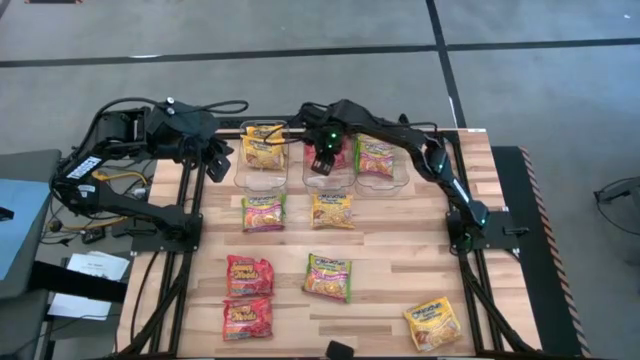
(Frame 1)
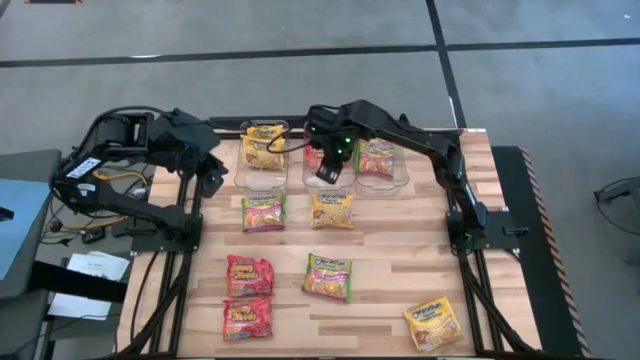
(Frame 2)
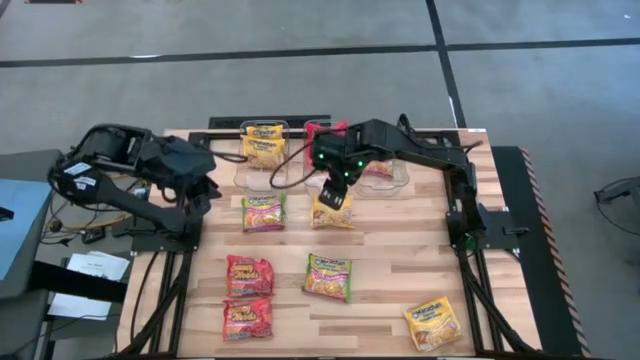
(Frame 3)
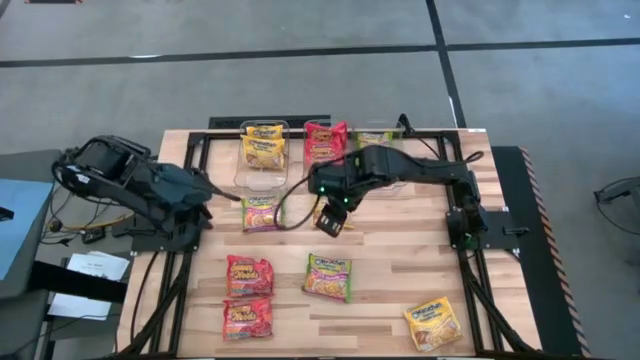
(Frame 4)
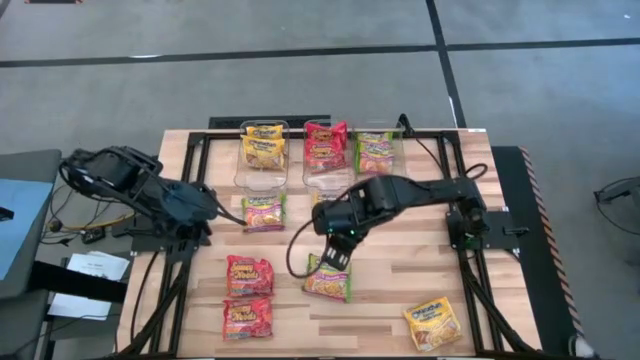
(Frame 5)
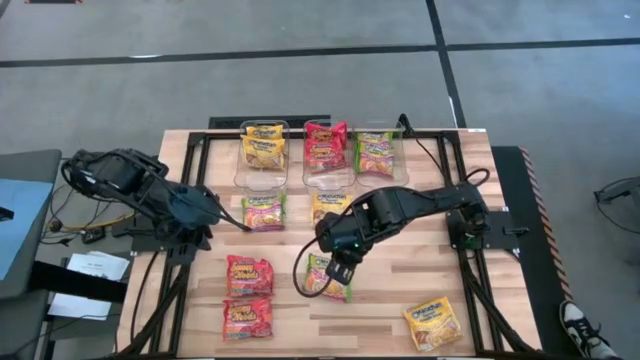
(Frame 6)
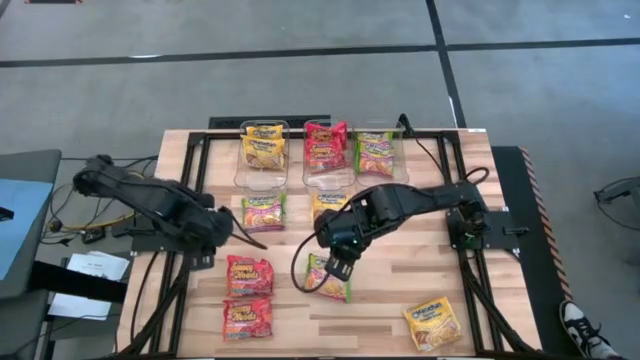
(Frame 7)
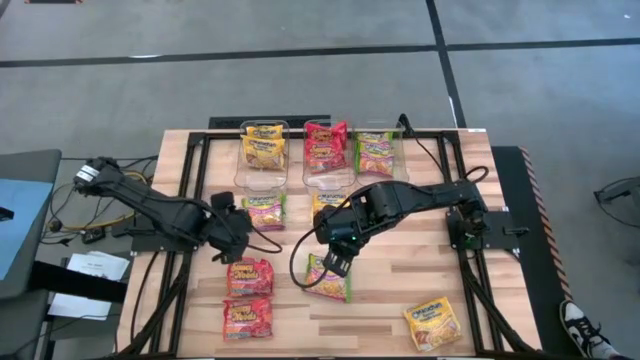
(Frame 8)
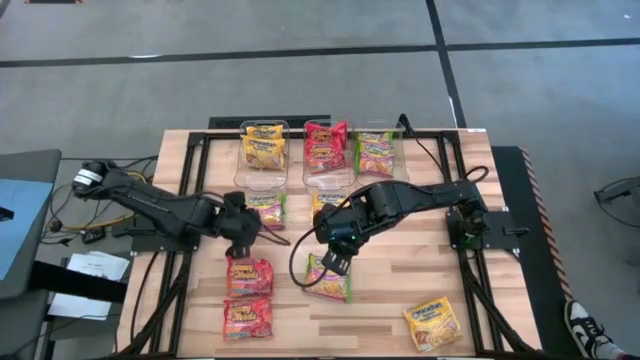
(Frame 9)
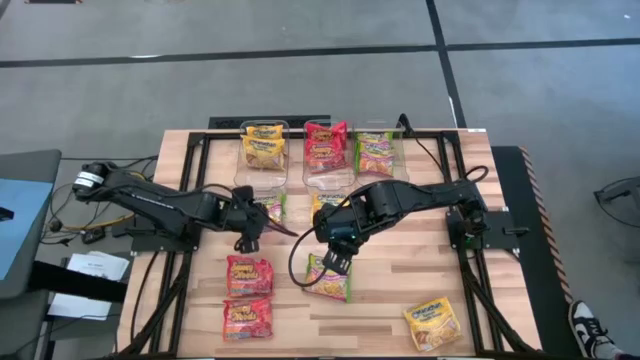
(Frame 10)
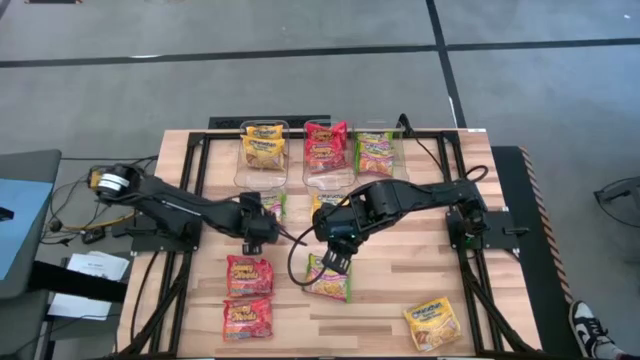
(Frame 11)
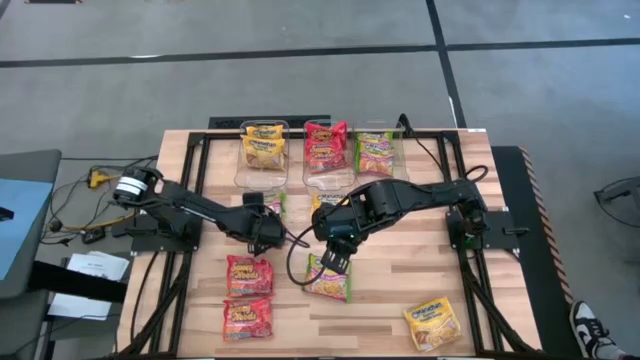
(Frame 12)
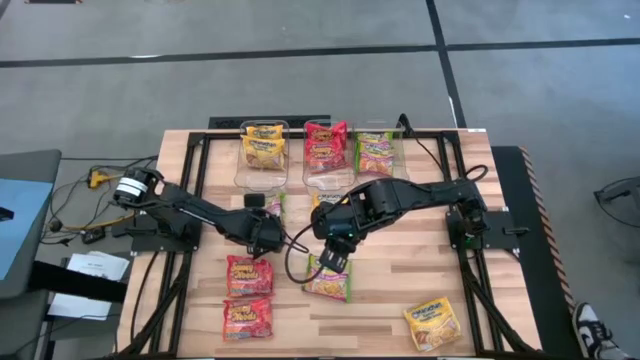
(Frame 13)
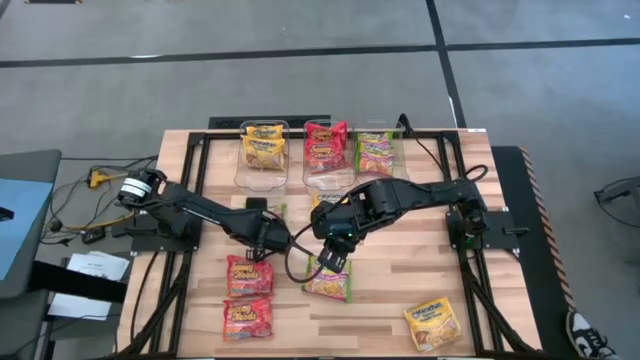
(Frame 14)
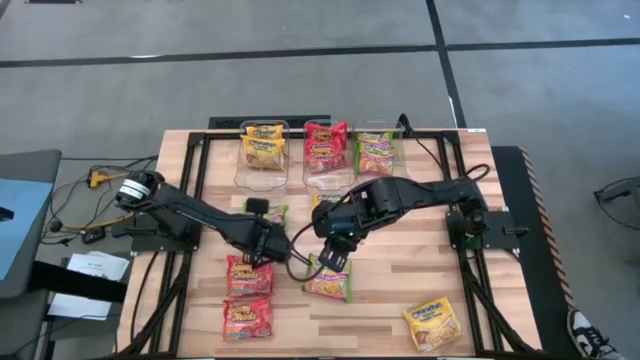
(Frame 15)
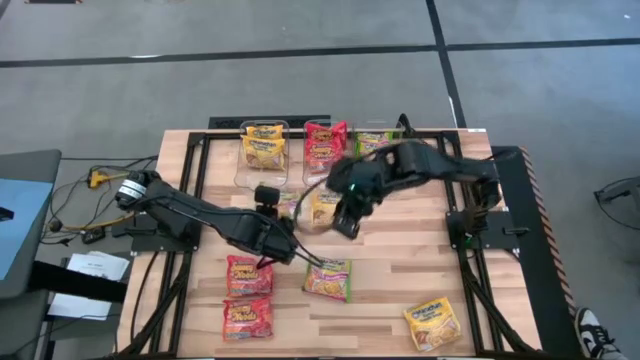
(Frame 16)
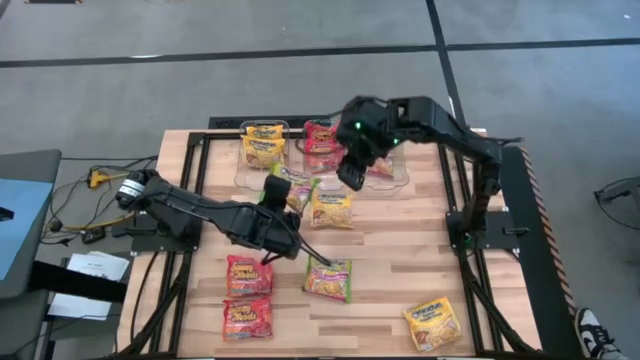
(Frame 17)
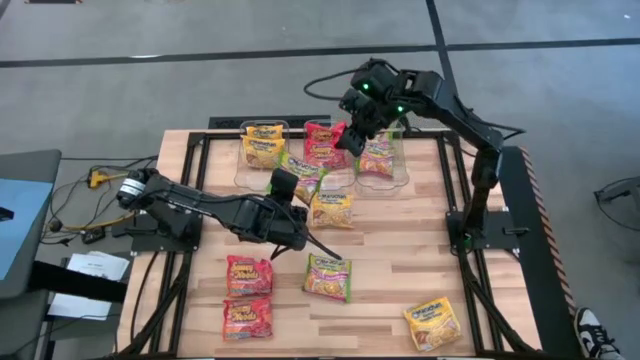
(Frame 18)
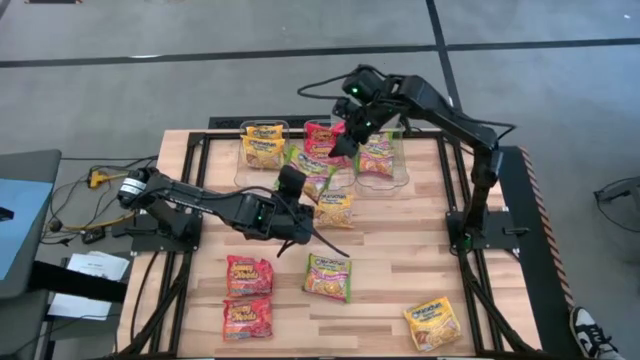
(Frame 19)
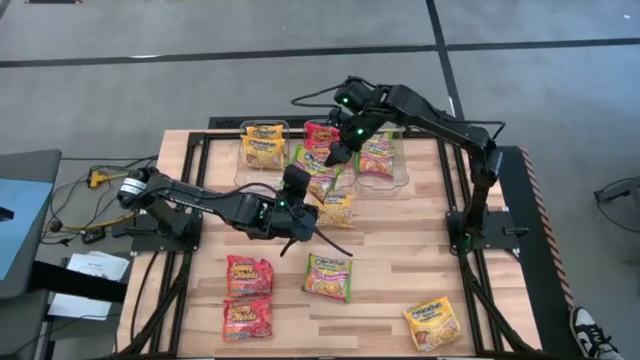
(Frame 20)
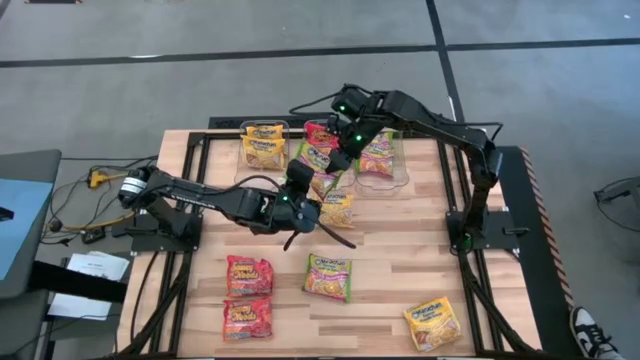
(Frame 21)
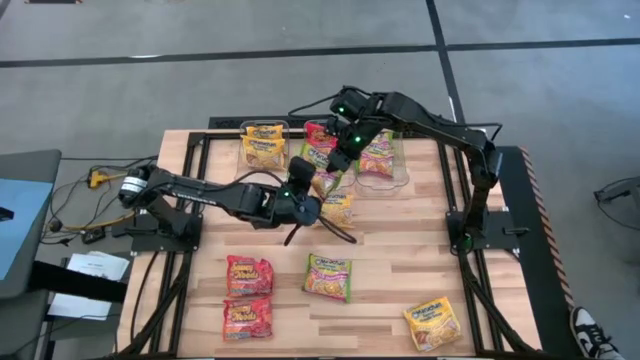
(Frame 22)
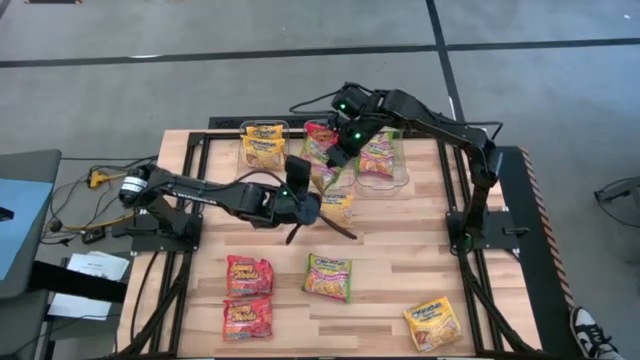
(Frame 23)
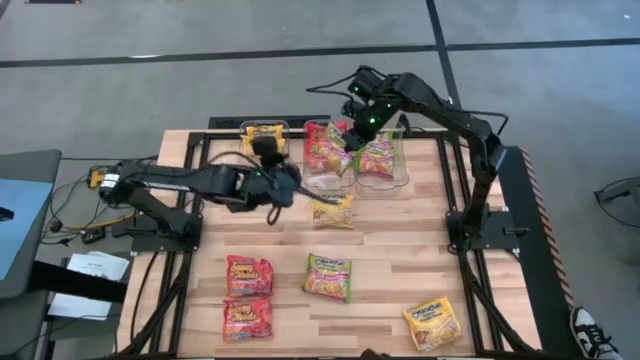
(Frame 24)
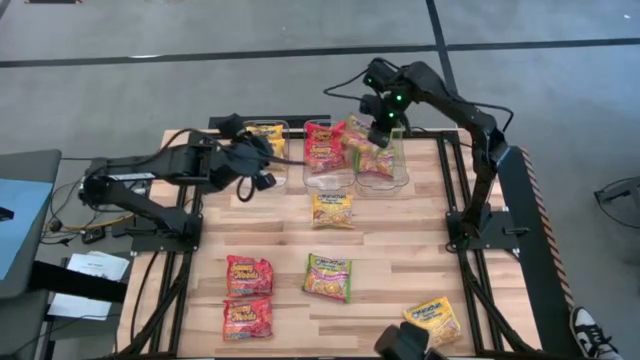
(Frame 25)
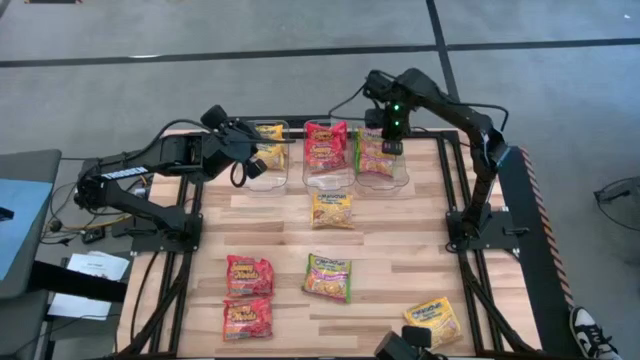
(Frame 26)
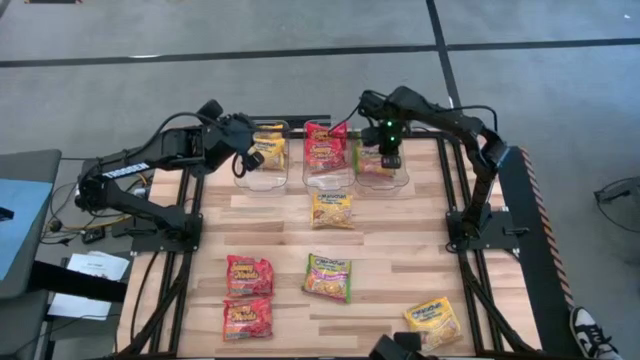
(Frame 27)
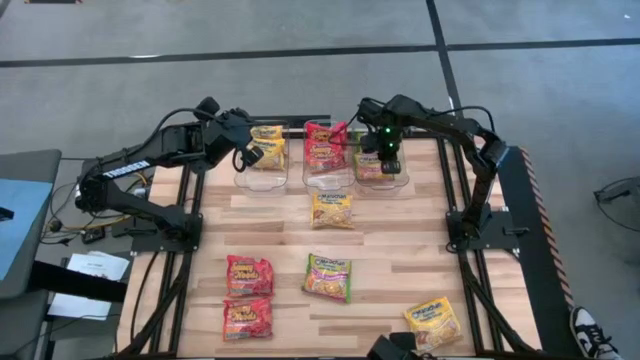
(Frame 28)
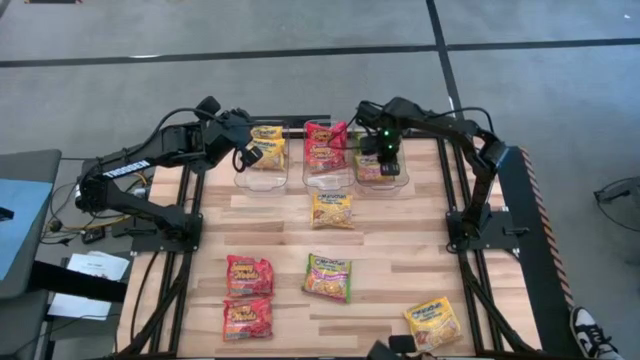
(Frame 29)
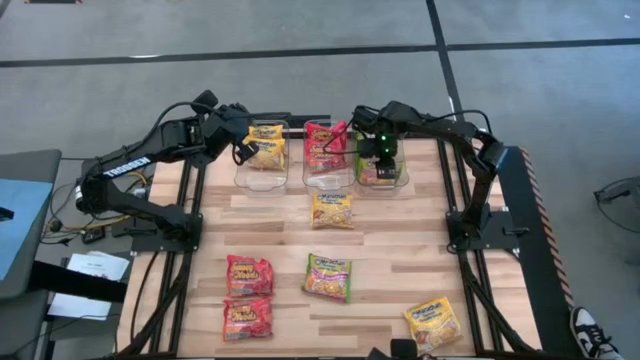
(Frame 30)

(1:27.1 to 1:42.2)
Task: Sort Maruchan noodles
Put the green noodle pack into the right transparent bin

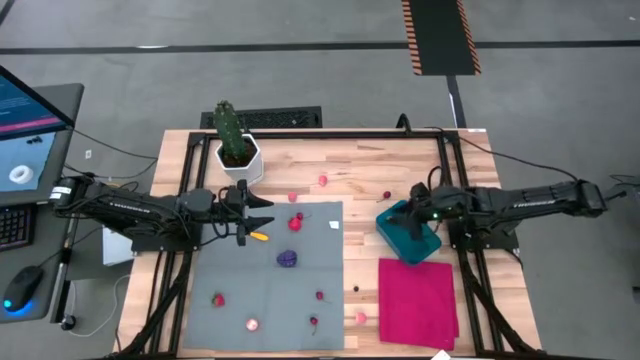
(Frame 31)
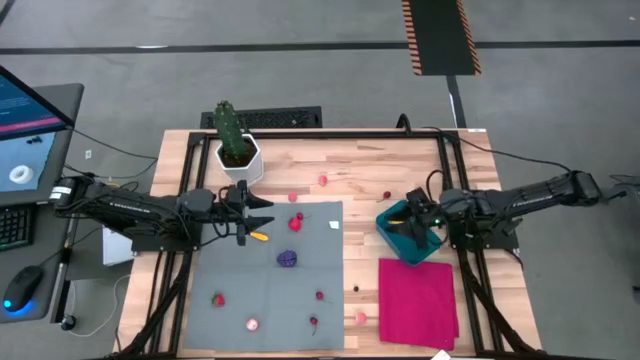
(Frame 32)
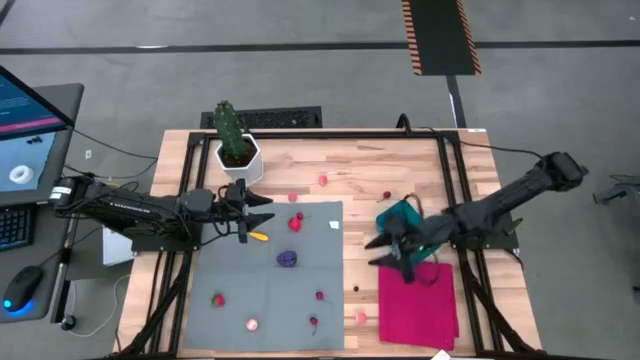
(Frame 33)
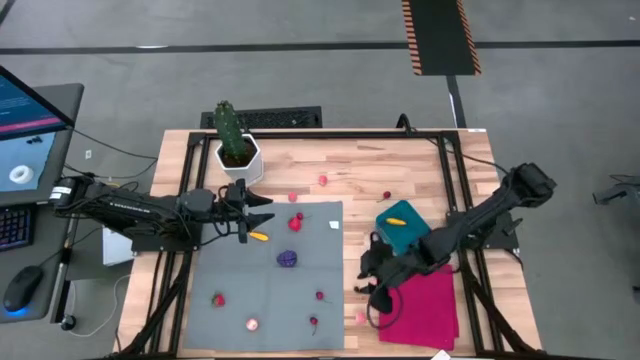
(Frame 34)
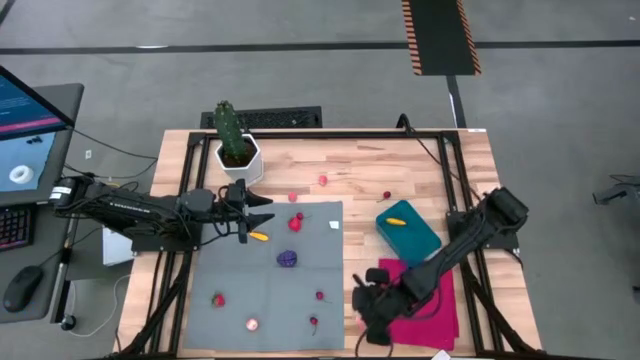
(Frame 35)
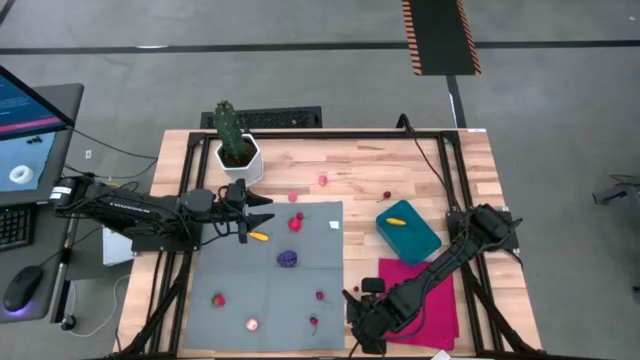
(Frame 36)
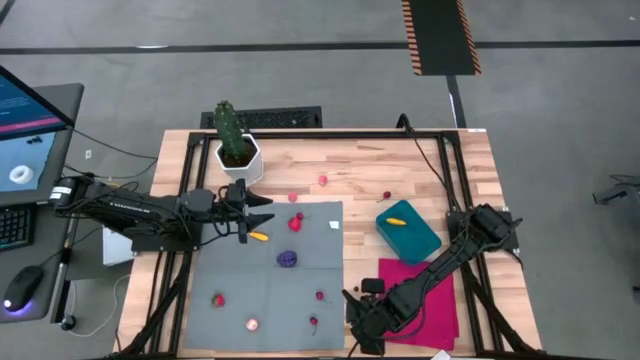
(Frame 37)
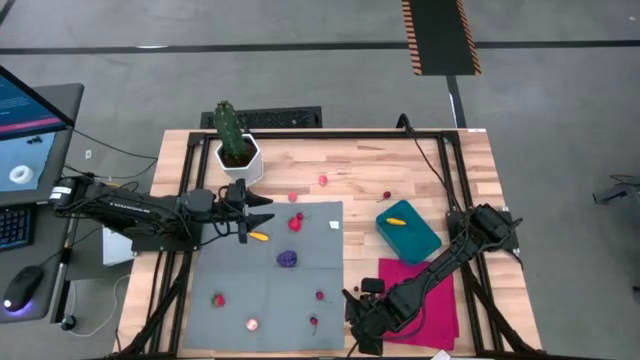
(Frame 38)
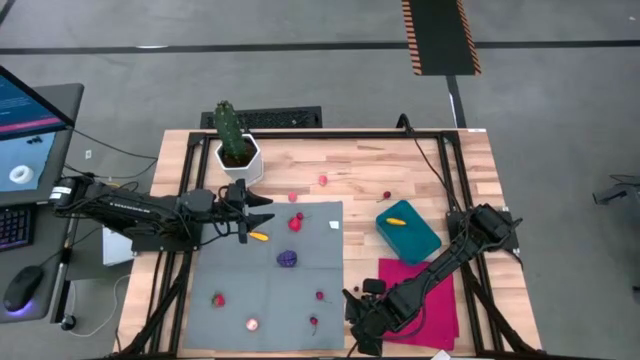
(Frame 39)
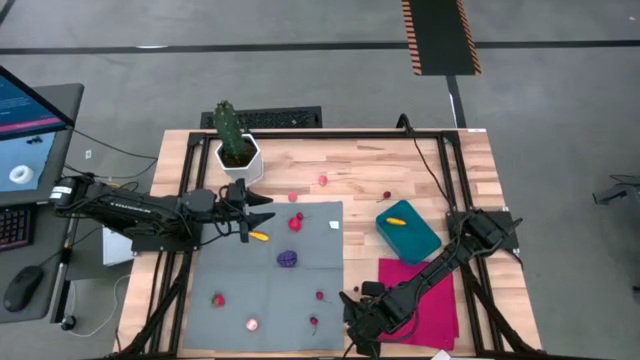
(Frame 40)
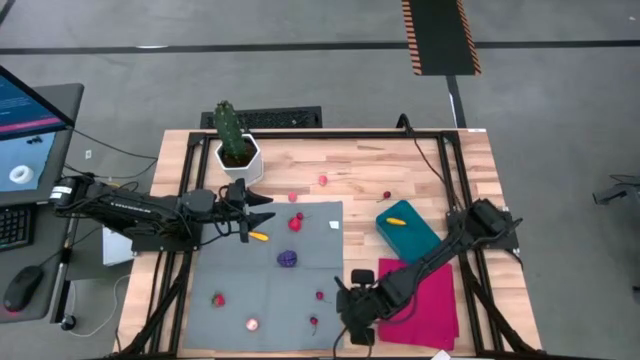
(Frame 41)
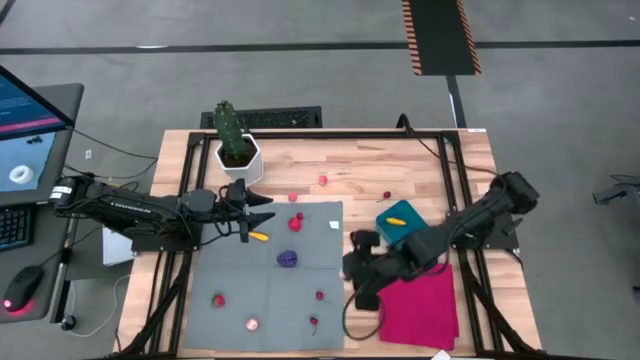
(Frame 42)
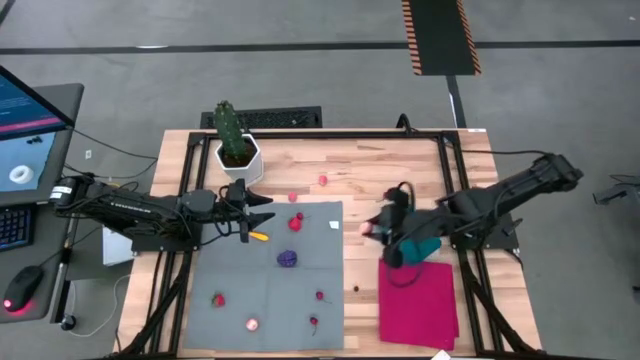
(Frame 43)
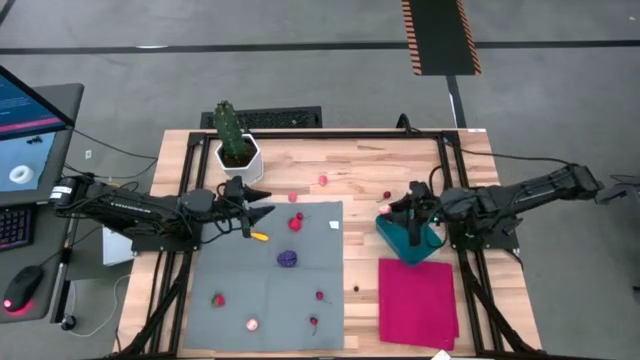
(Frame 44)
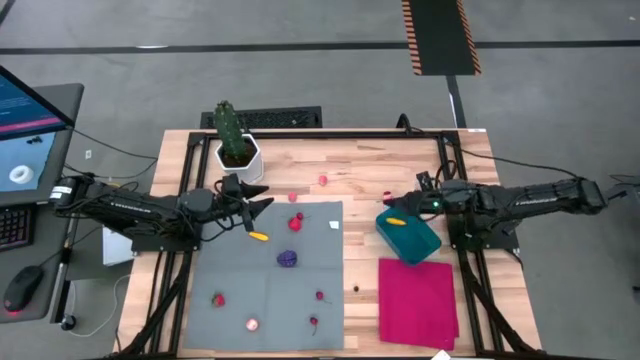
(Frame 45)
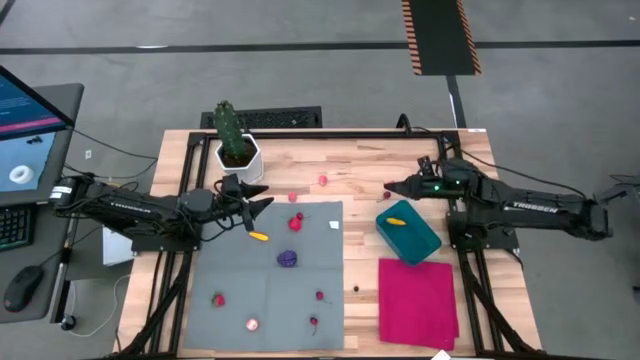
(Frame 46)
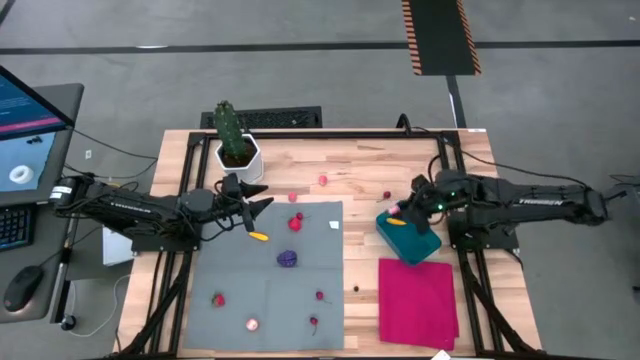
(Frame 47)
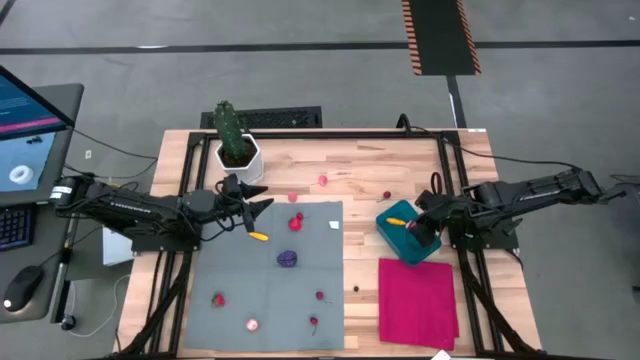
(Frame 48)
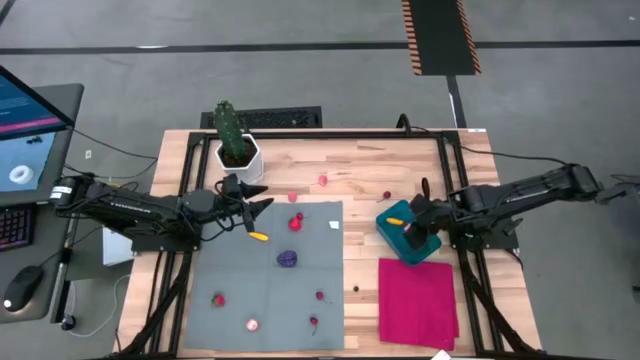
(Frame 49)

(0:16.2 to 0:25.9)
Task: Pick and placing Produce into tupperware
Put the pink peach into the blue bin
